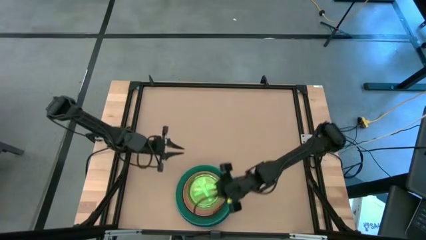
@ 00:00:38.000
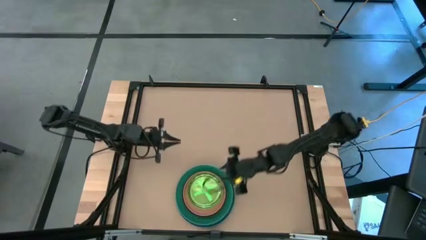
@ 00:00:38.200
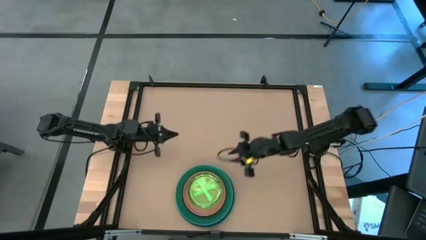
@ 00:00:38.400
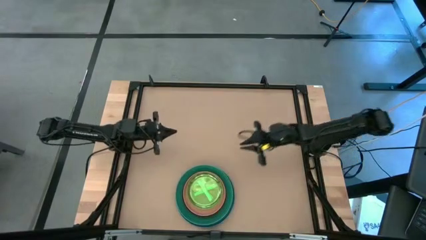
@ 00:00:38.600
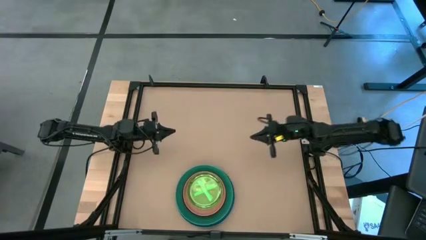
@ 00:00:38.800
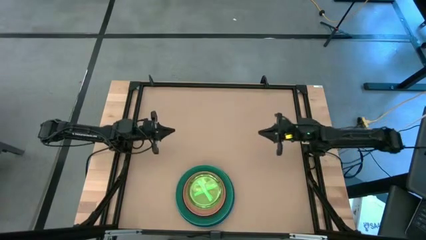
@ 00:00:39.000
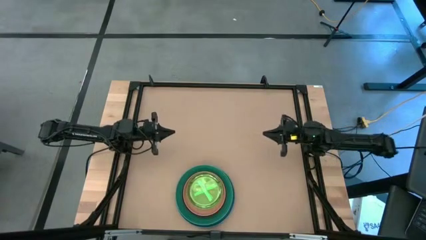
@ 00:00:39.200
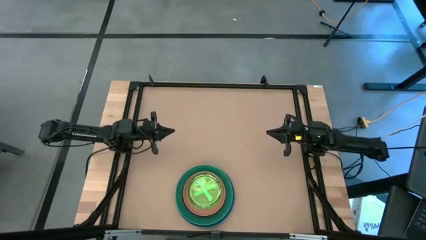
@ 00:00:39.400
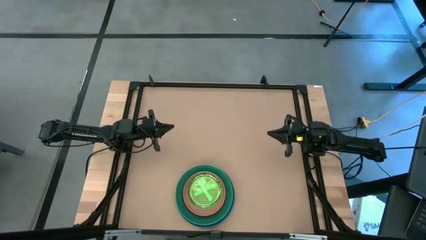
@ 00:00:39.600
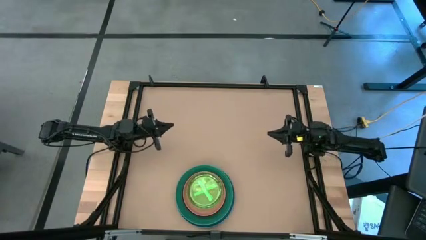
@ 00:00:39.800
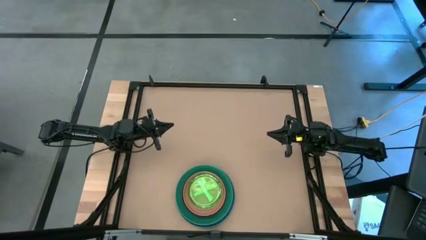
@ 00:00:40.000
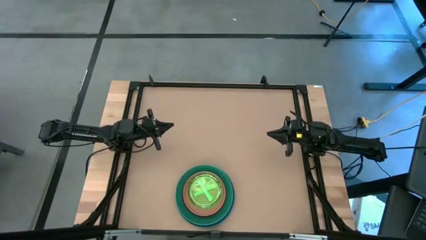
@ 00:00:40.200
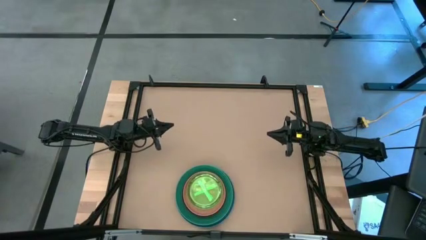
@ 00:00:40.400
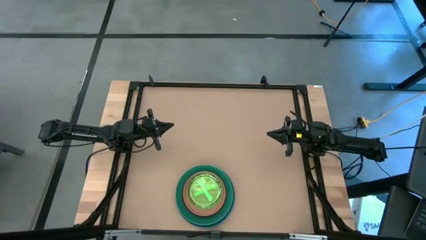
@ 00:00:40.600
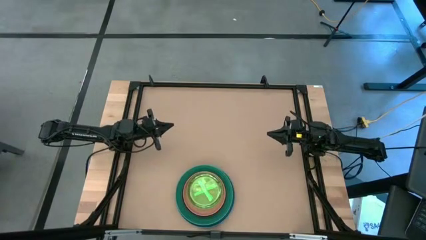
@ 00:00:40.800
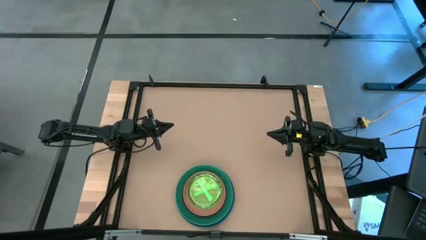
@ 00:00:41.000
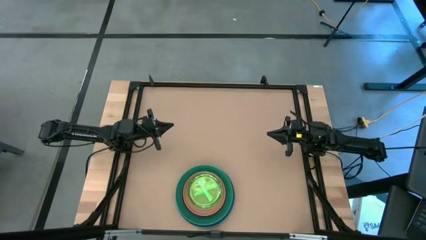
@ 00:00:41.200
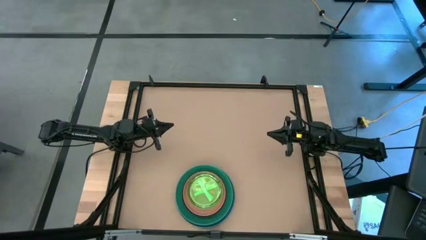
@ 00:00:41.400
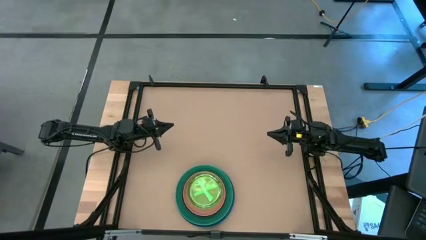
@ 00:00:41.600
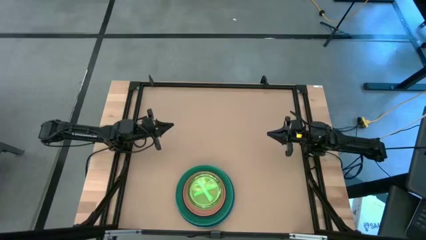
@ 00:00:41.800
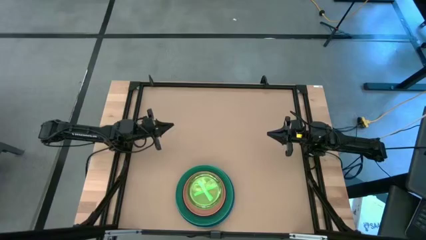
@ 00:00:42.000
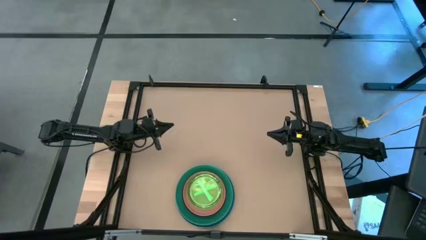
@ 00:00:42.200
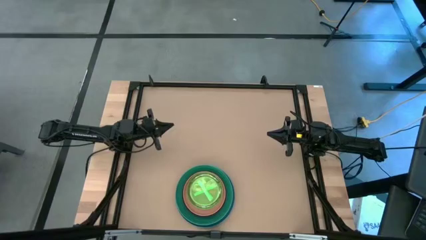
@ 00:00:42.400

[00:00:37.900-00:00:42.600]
Task: Stack plastic plates
Return to Home Position

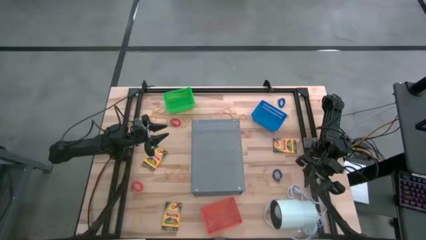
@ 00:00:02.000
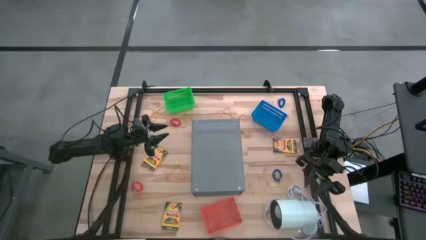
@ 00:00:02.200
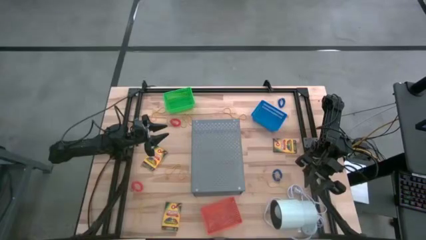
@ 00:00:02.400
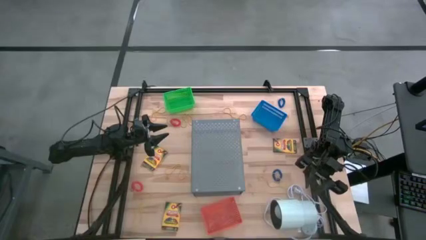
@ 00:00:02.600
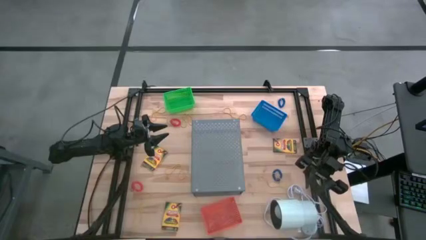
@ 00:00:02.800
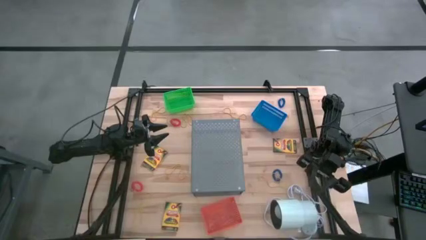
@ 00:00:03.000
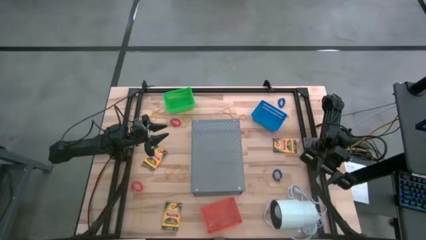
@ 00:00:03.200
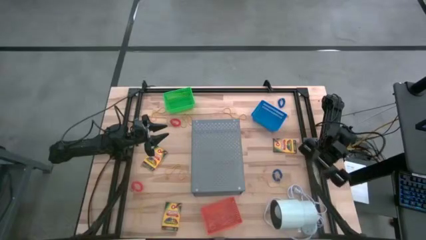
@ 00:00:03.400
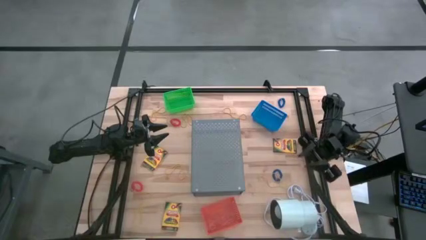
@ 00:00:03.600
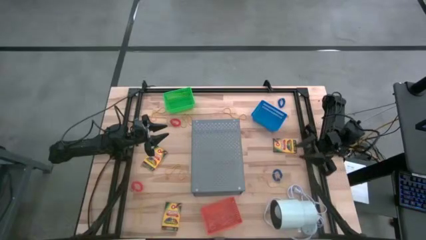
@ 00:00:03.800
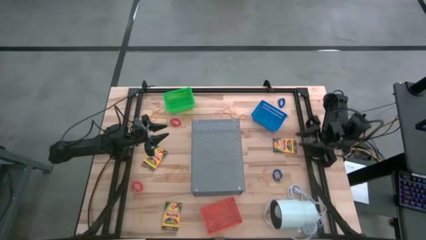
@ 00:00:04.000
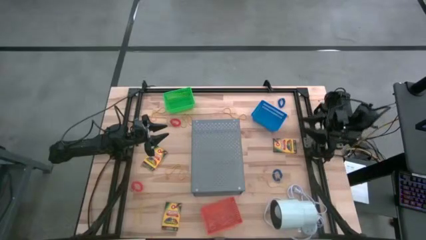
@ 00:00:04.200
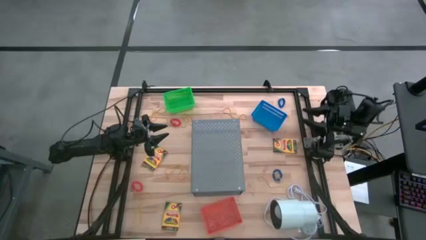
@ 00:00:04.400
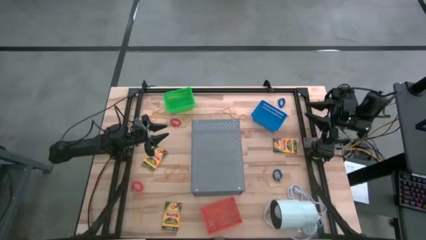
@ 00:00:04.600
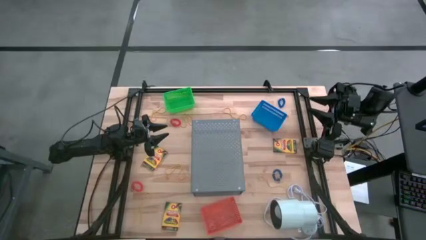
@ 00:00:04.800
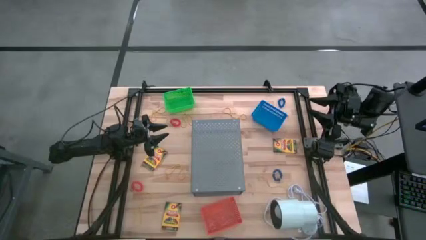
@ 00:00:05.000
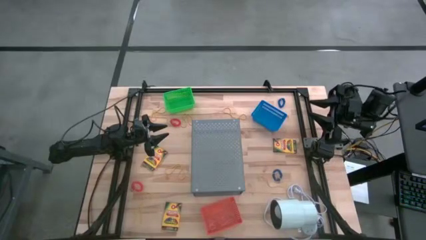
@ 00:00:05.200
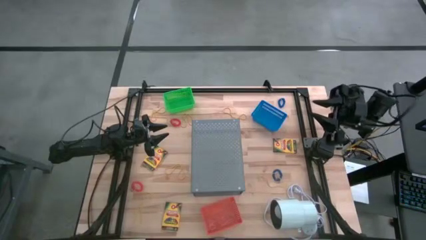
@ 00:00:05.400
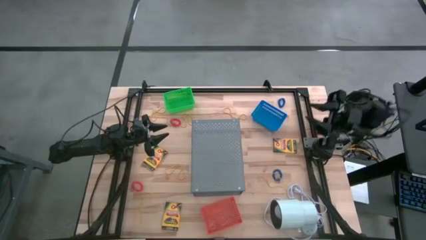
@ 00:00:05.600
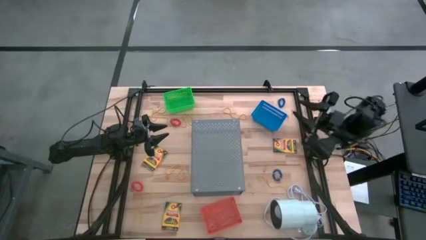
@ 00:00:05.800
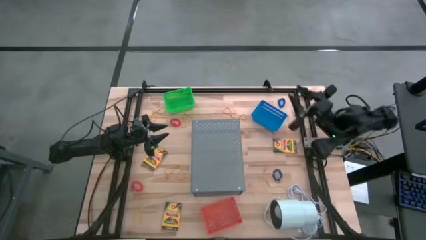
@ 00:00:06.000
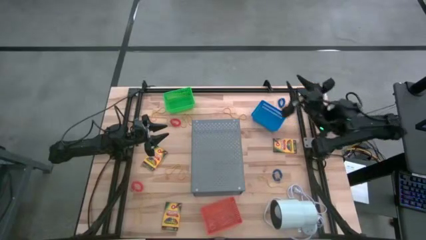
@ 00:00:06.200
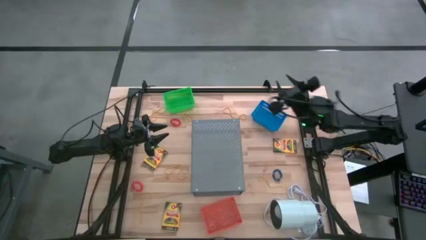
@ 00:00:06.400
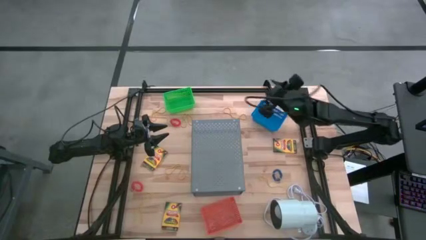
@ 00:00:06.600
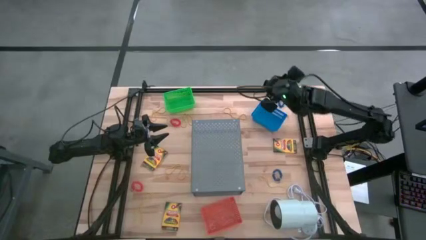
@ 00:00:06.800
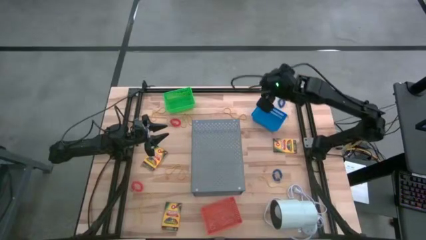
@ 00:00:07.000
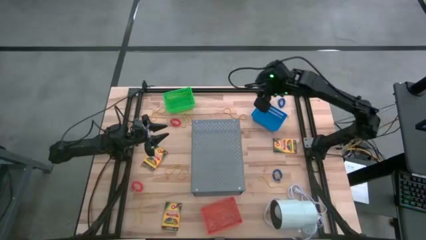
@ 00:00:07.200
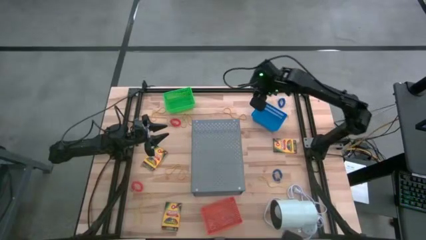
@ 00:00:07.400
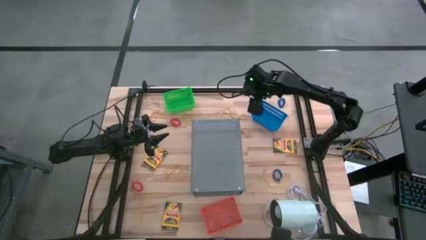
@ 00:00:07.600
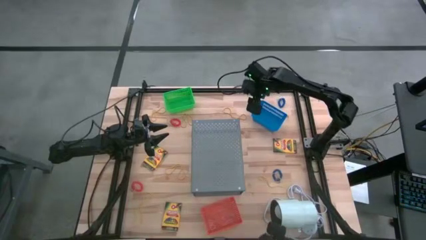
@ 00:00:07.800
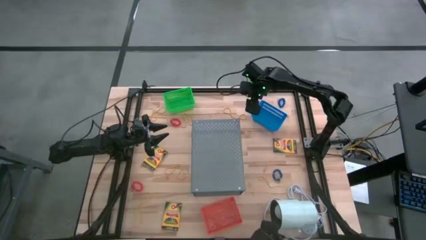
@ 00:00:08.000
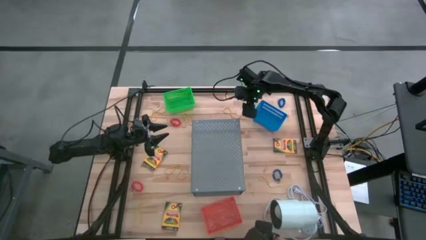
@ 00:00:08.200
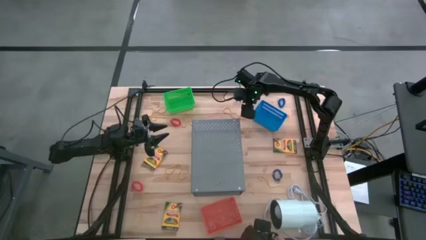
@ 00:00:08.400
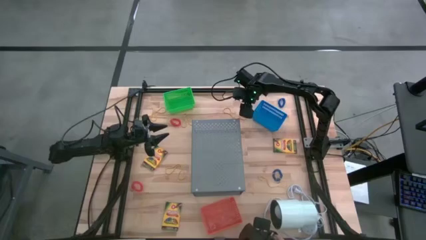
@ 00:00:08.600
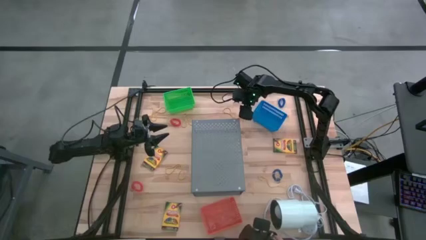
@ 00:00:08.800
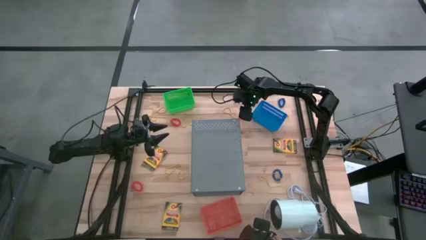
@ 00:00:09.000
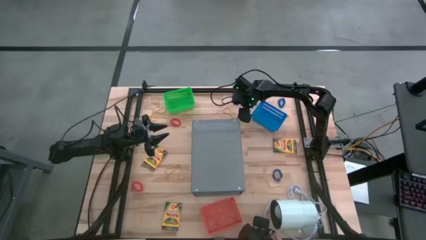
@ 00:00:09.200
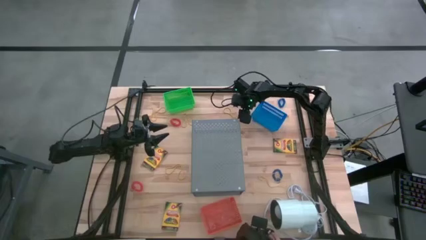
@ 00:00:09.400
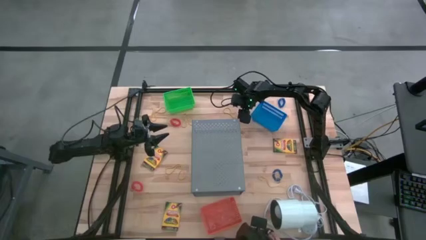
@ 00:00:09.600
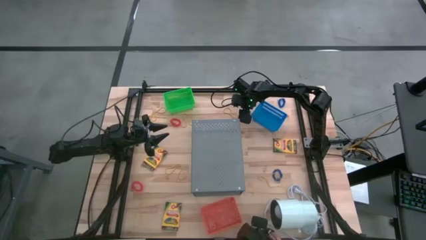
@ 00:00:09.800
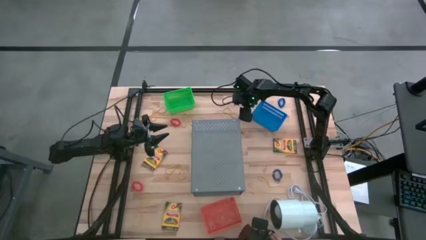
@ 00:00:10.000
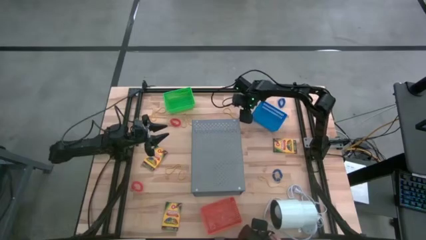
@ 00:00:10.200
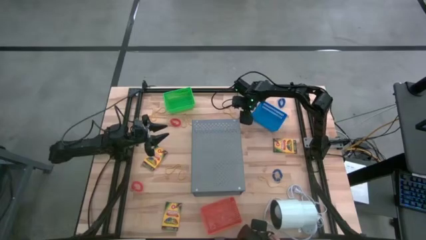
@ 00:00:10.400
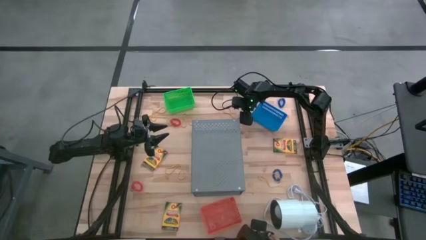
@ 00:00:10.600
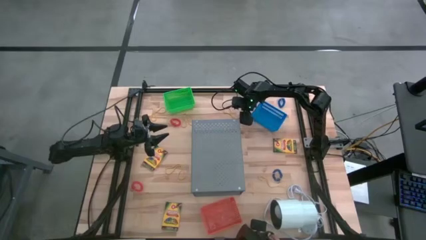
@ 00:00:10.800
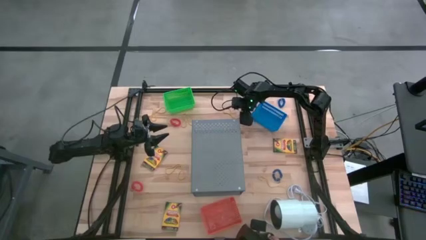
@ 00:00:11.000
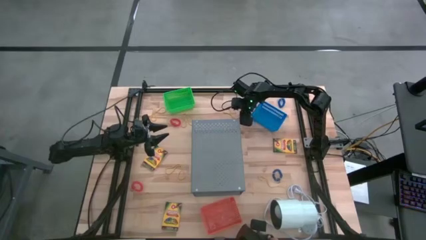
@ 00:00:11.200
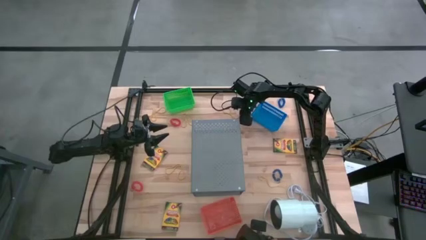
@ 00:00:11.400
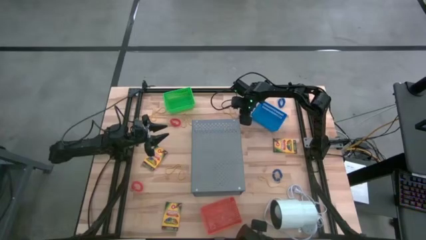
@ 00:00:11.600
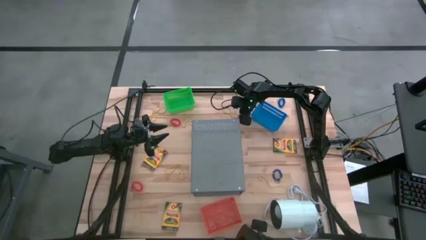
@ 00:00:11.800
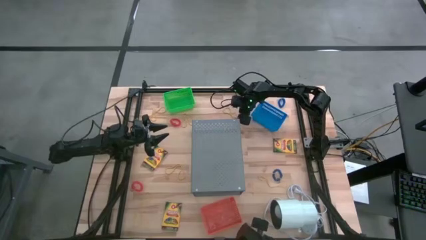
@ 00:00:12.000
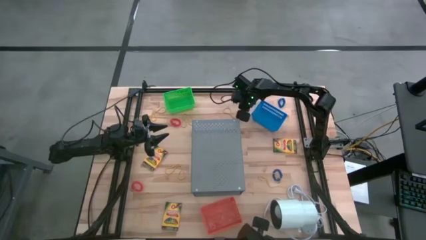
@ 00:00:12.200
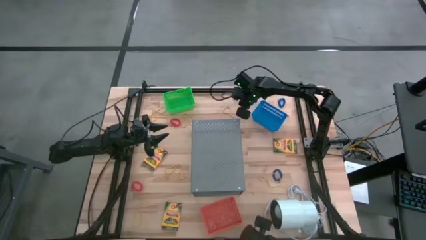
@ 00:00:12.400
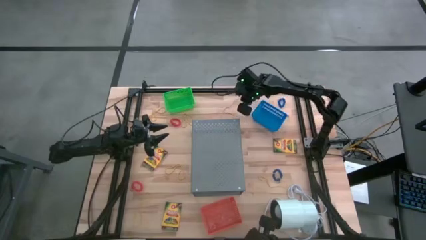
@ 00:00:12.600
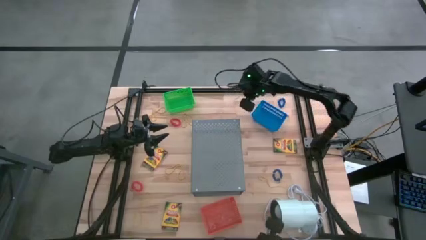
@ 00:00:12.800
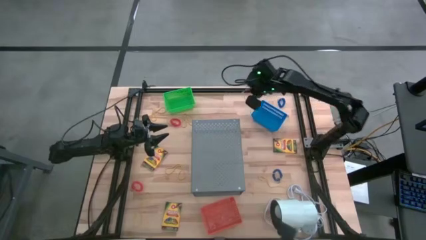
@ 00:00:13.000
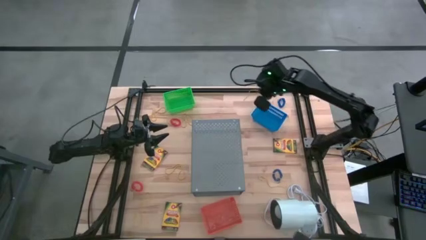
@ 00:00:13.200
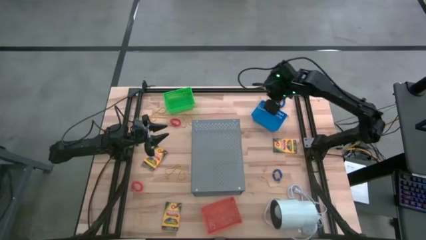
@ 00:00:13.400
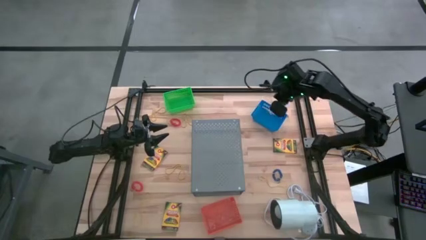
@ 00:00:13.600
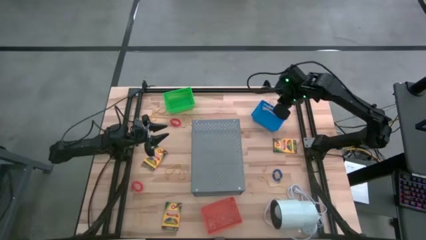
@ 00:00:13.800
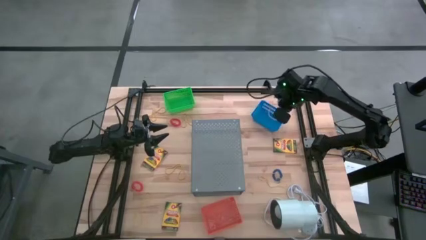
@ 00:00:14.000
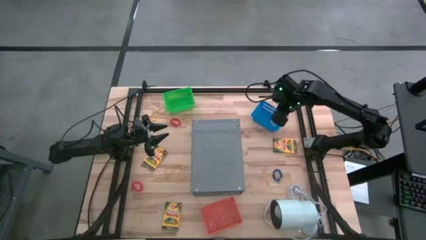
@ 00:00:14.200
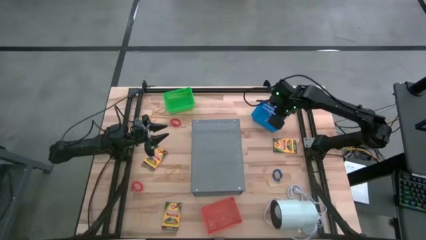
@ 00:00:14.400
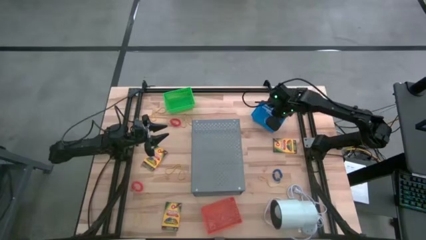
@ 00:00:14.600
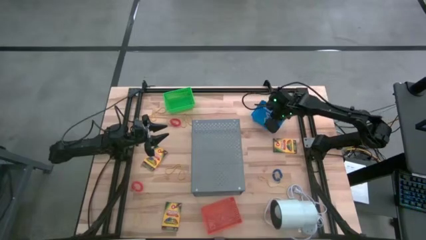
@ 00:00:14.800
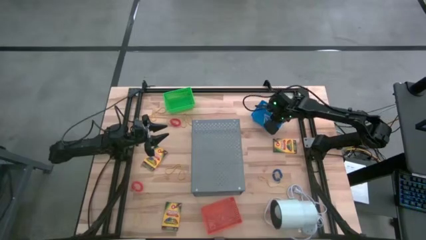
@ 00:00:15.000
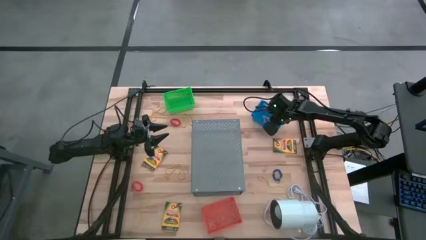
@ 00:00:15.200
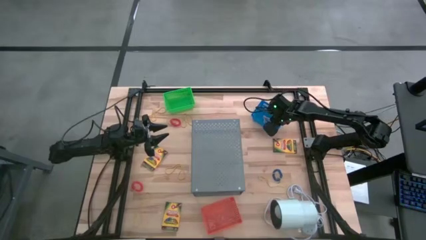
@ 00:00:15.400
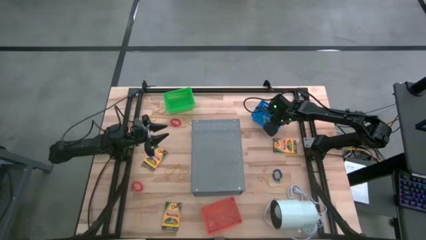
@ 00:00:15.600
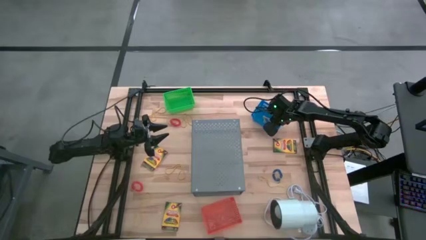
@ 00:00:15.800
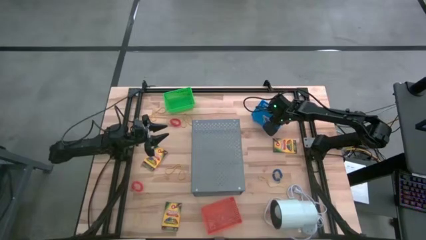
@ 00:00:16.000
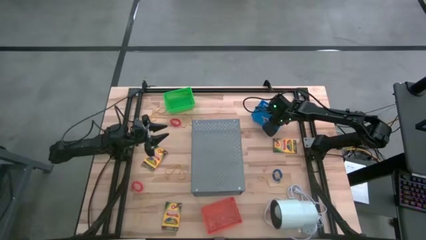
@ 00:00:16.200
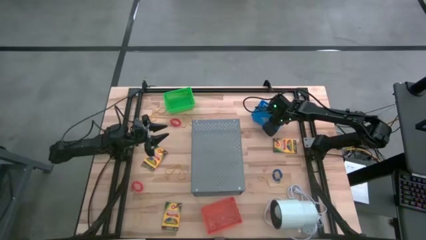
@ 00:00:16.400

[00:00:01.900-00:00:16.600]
Task: Pick & Place Office Desk Supplies
Put the yellow rubber band into the blue basket
